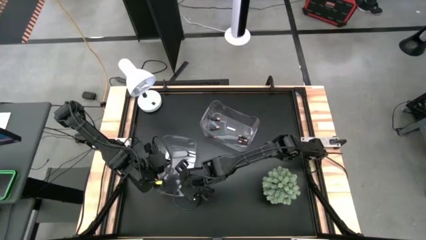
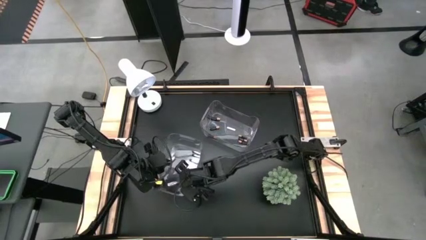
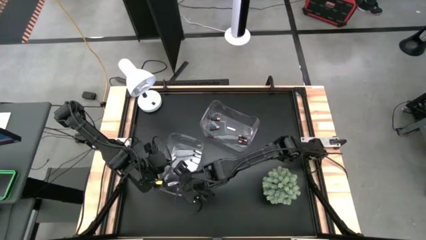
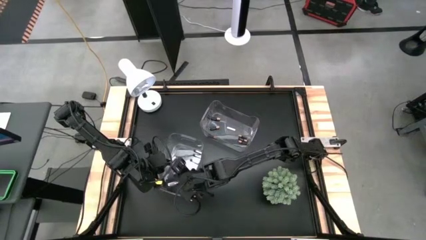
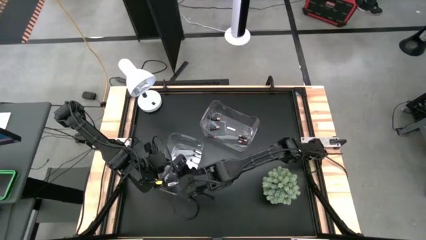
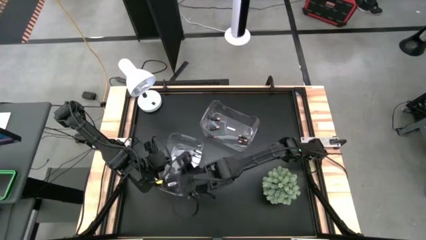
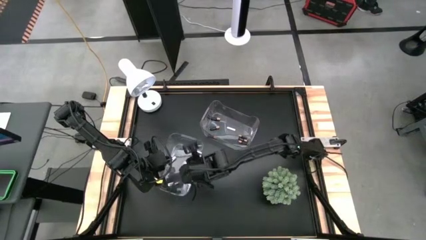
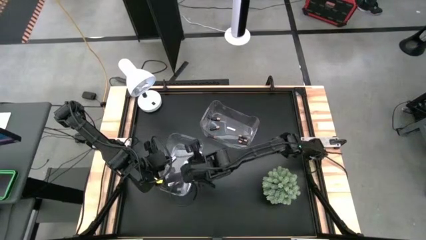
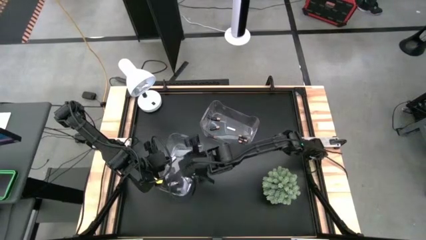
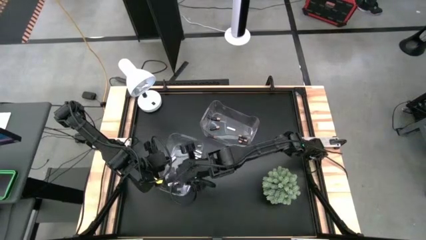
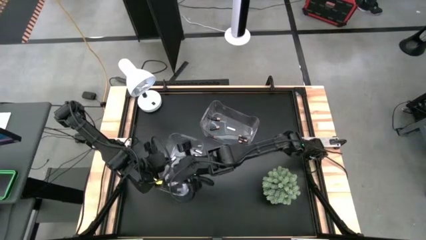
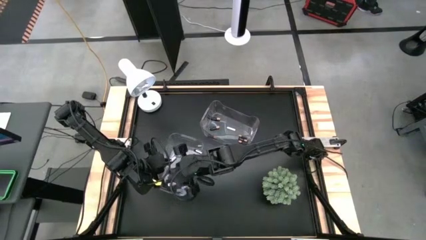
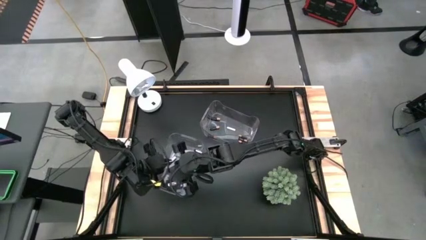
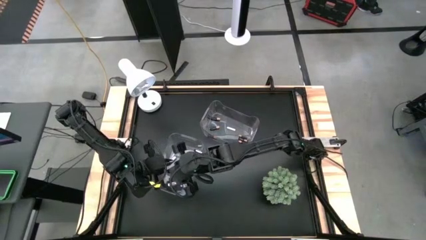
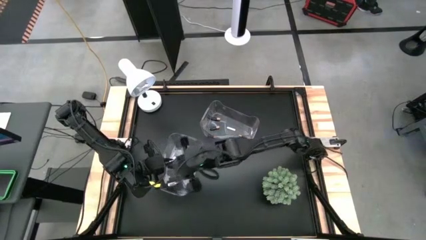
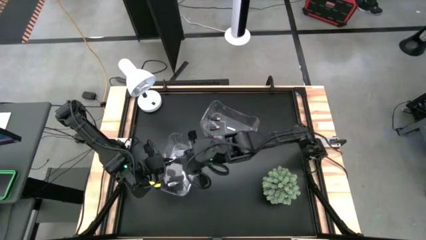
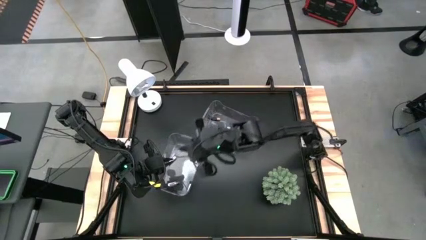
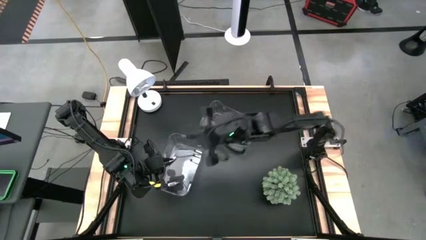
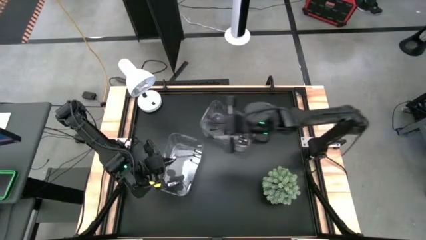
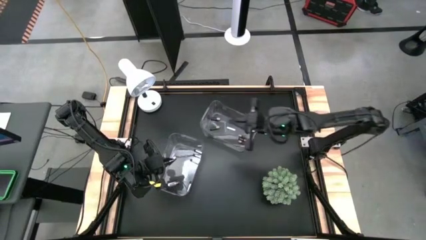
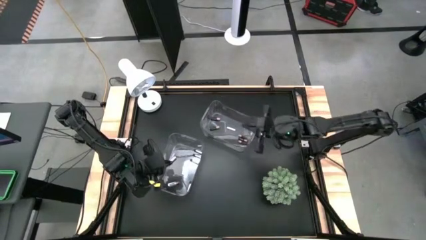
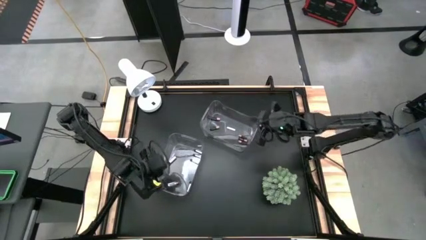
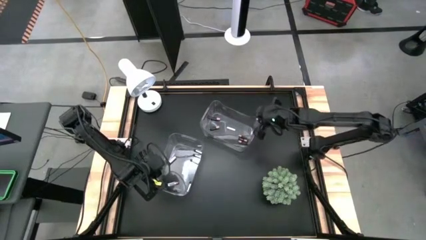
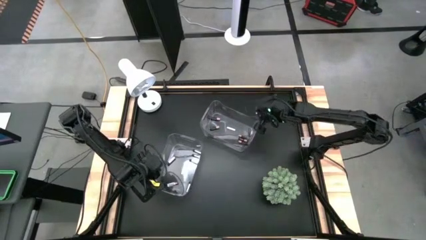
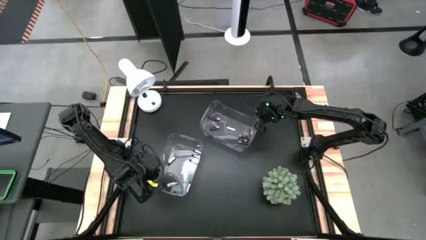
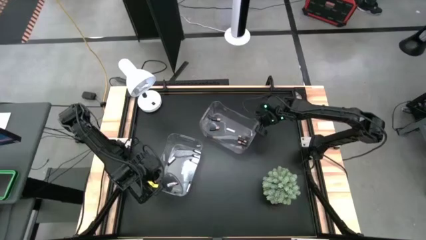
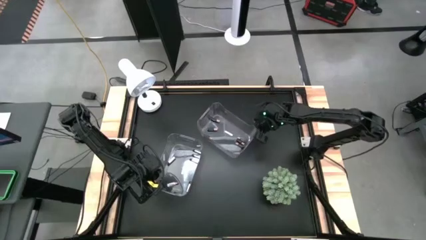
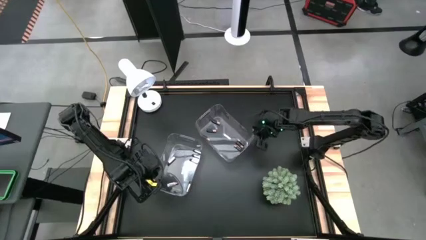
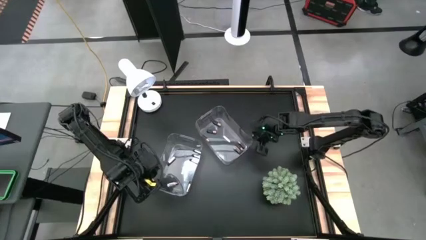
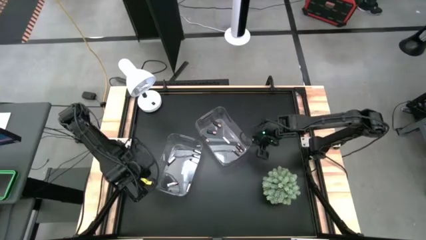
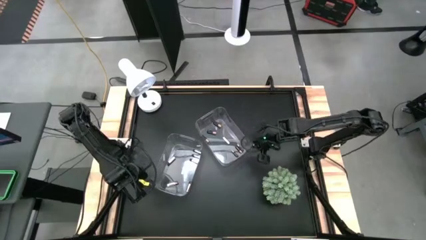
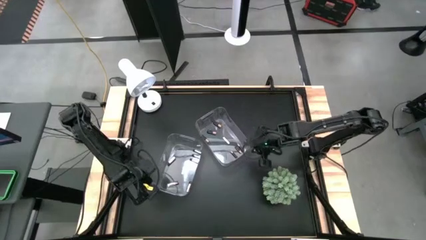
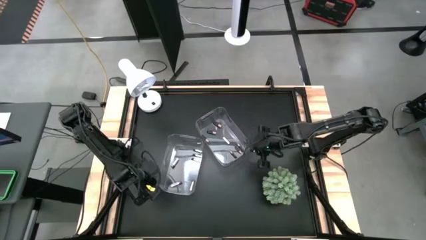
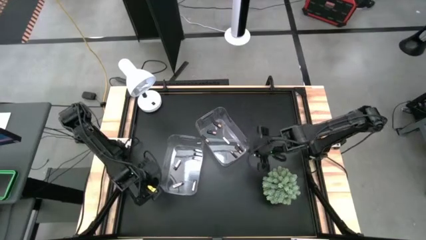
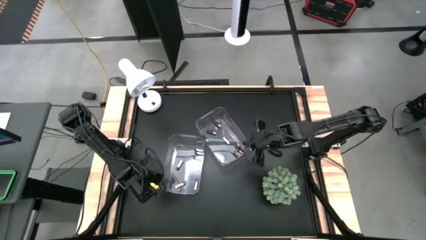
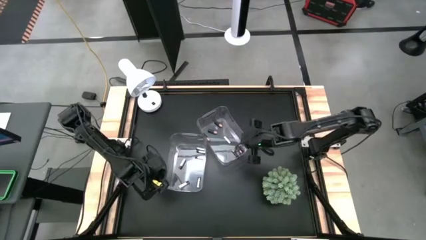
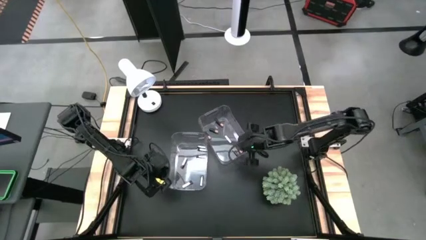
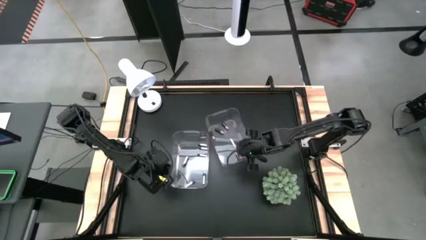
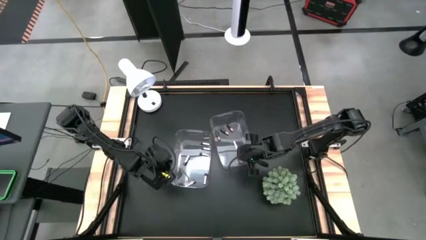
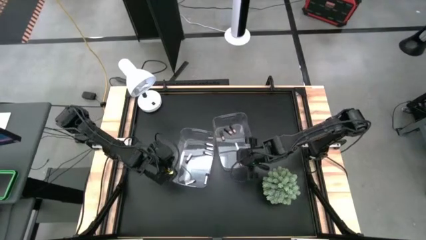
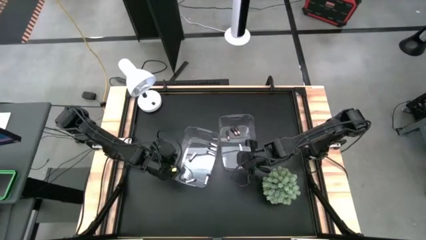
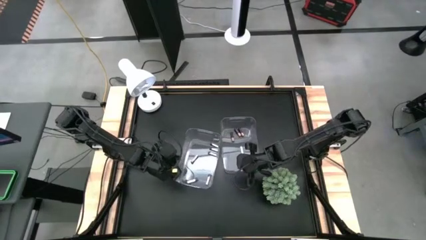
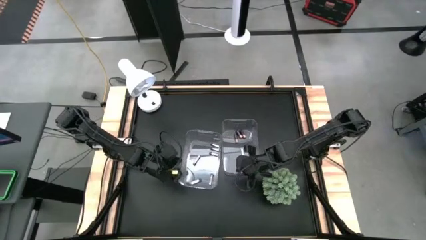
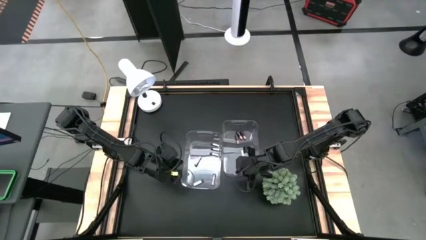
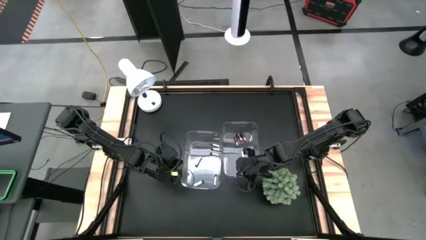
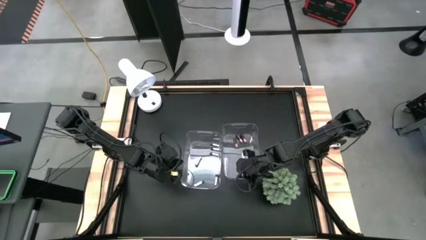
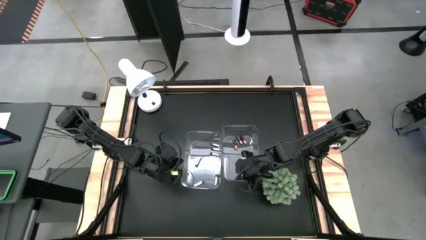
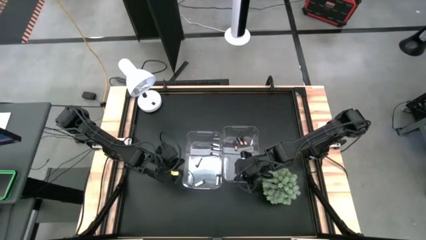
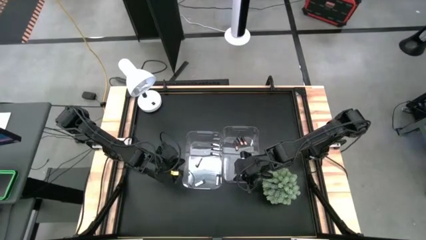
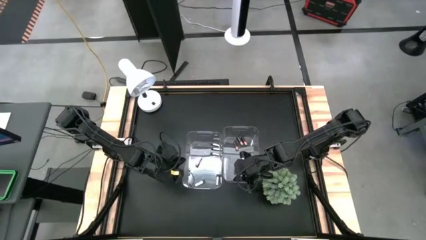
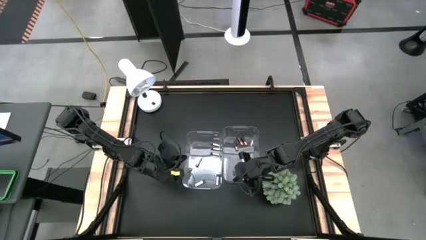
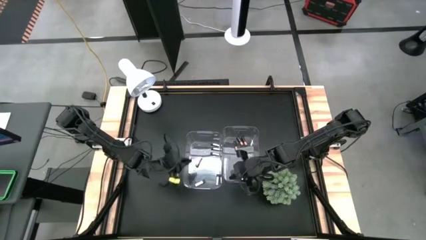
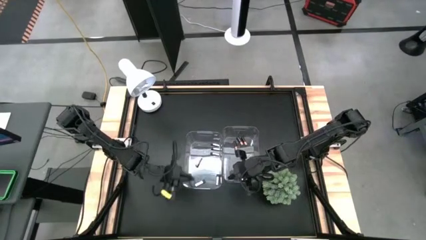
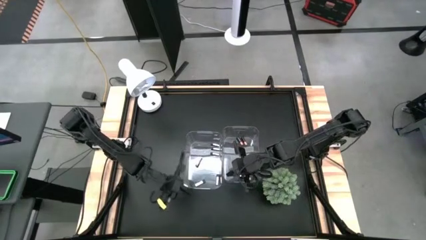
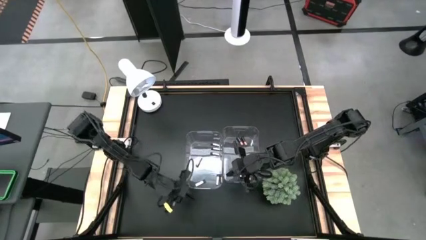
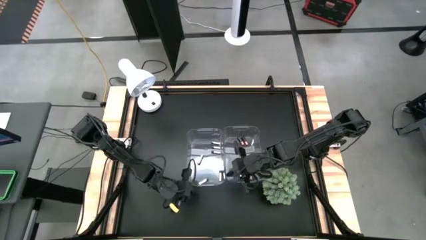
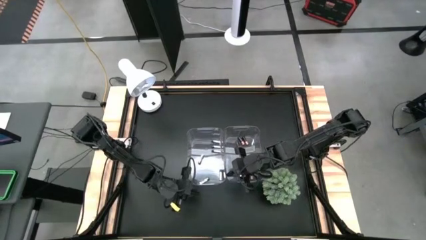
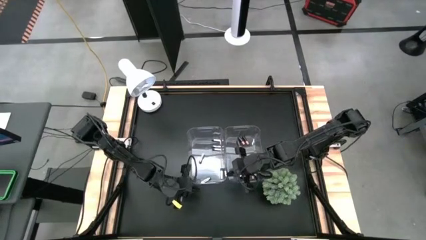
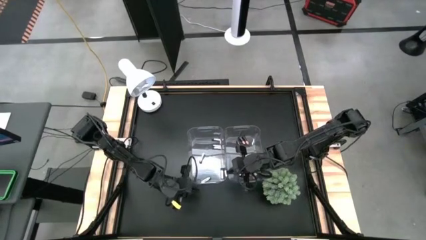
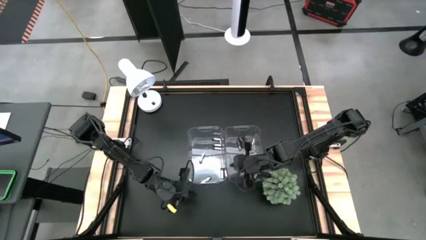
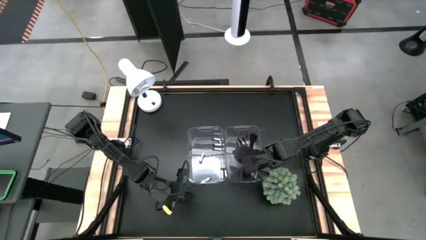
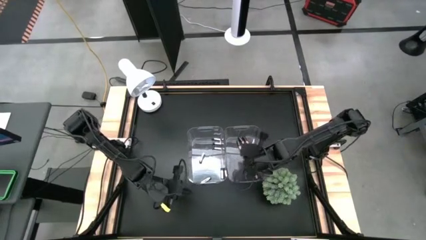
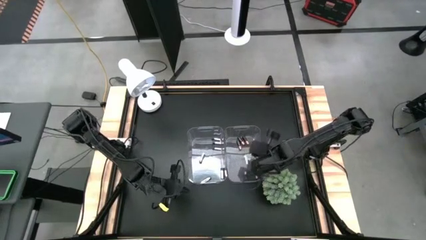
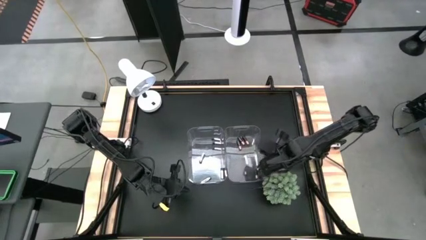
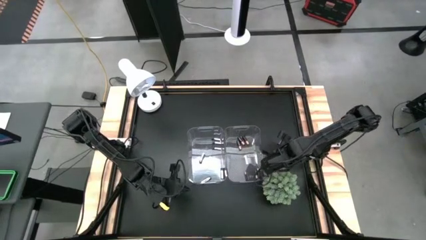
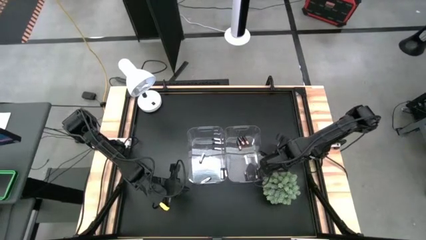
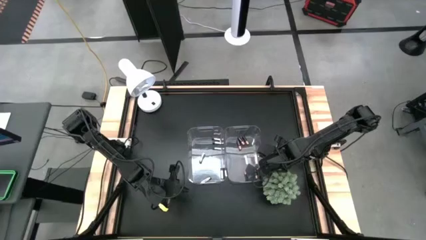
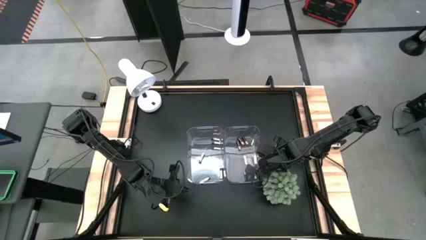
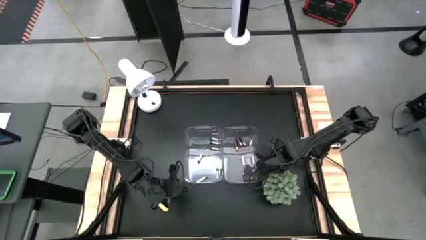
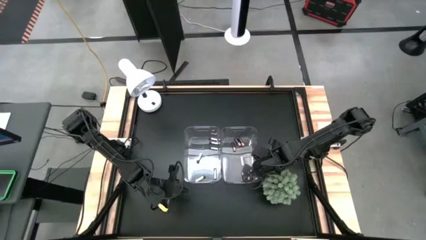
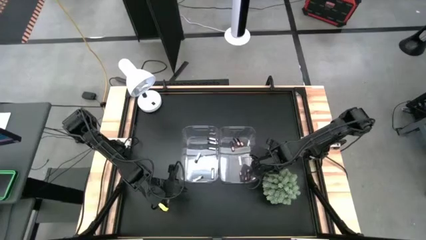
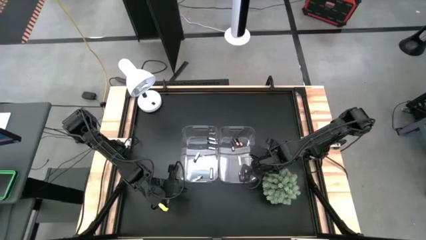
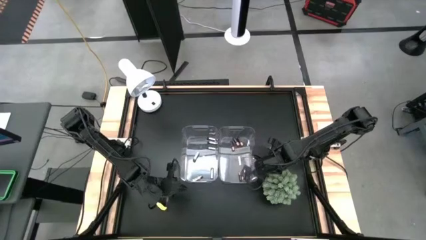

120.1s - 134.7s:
Task: Sort batteries
Adjust the two transparent bins to the center of the table

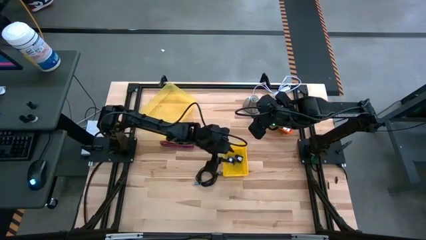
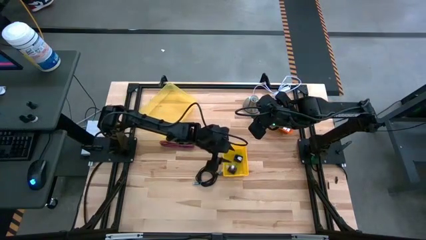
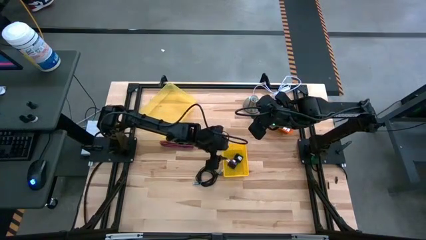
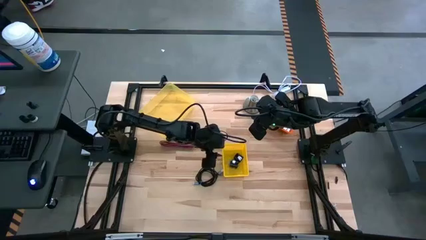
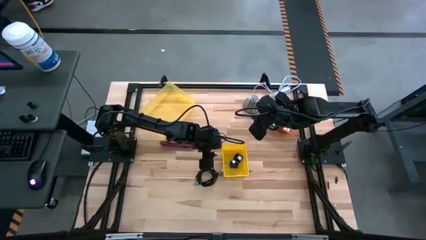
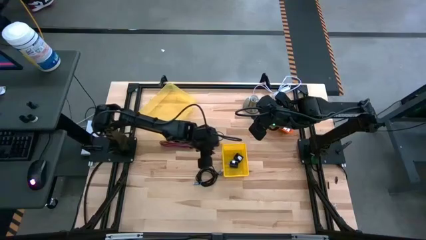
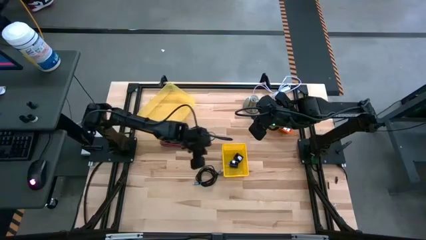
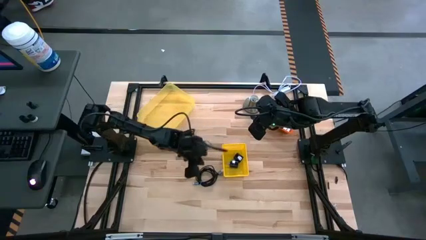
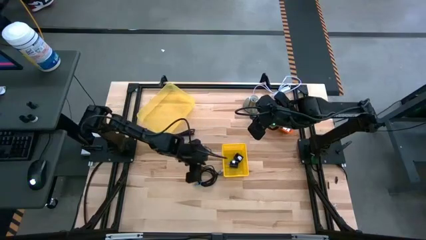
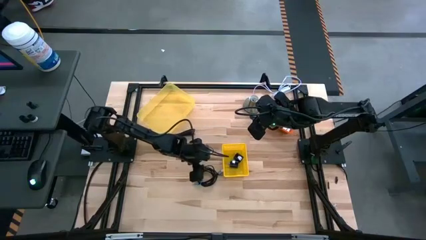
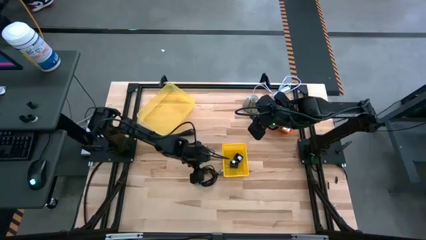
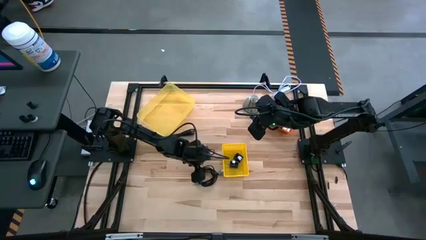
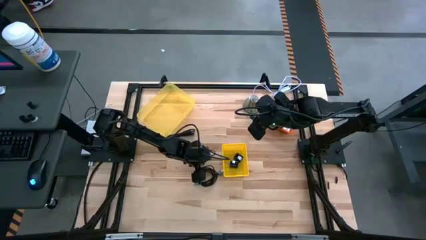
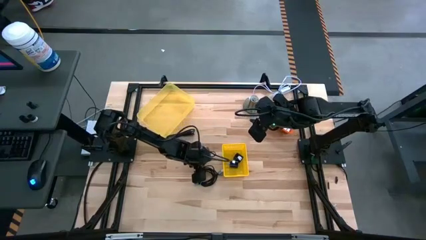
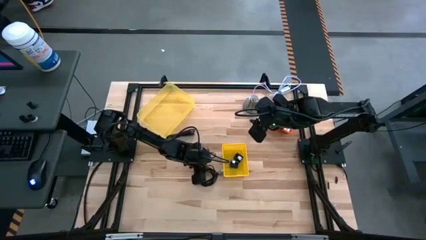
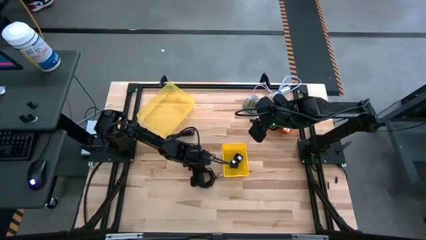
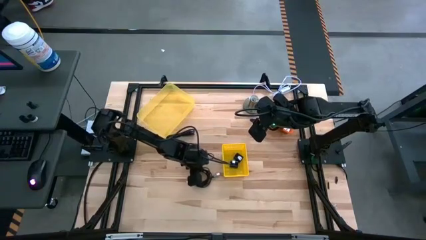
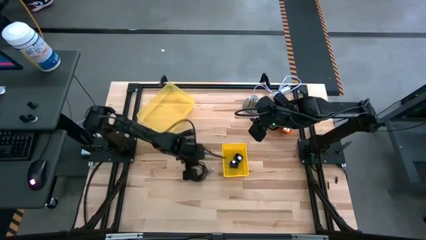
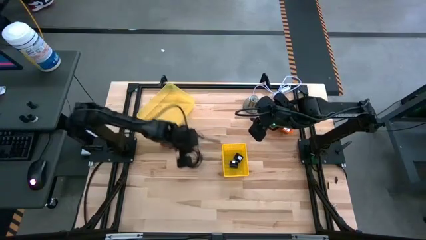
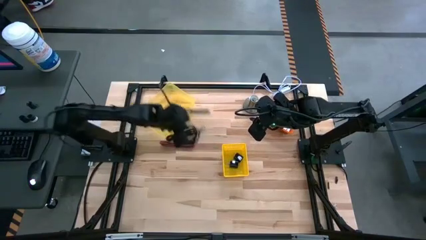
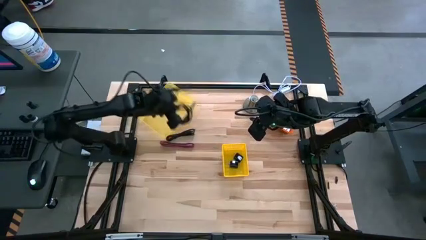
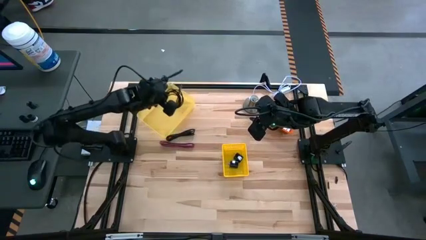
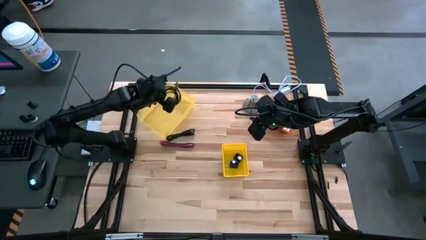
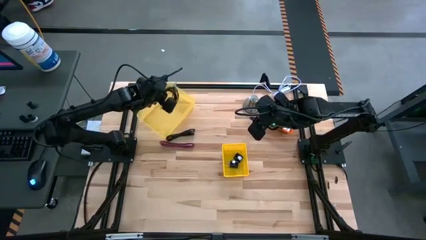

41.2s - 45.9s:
Task: Pick and place items into bin
Put the bottom black charger cable into the light yellow bin
